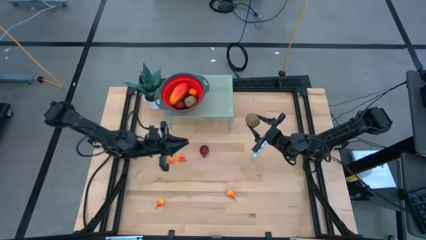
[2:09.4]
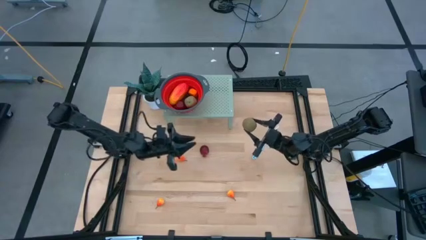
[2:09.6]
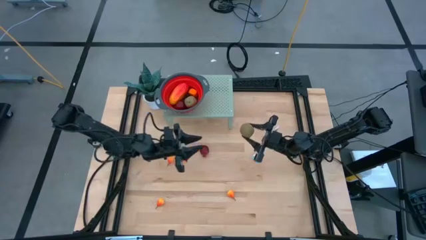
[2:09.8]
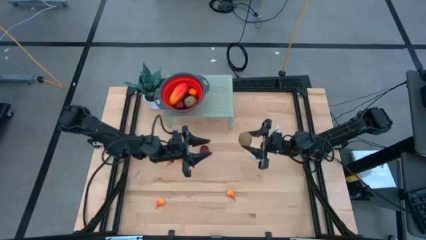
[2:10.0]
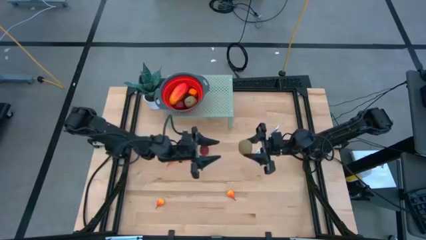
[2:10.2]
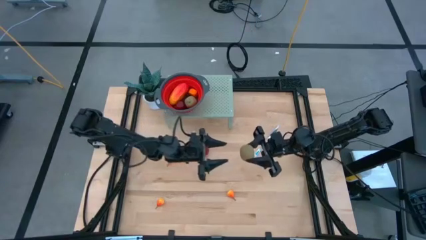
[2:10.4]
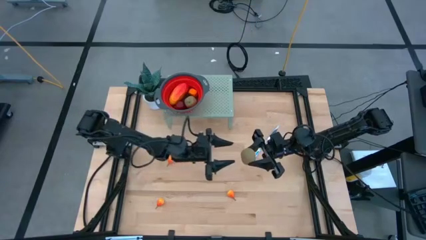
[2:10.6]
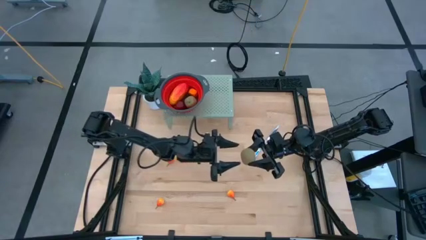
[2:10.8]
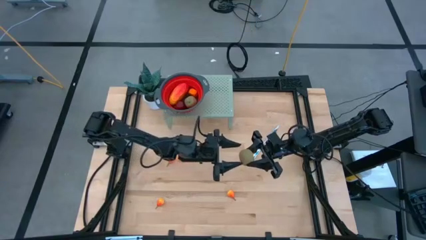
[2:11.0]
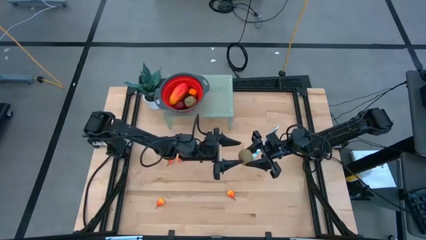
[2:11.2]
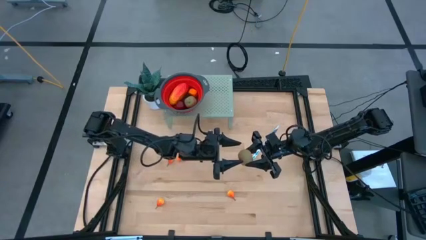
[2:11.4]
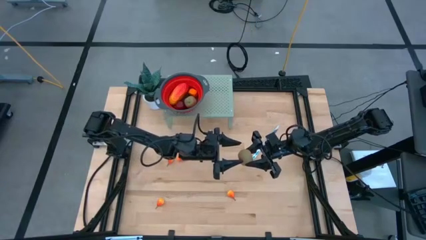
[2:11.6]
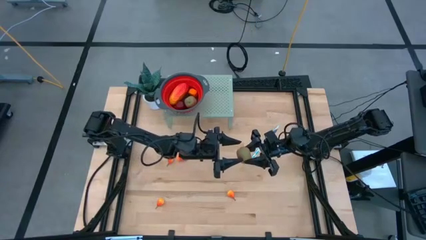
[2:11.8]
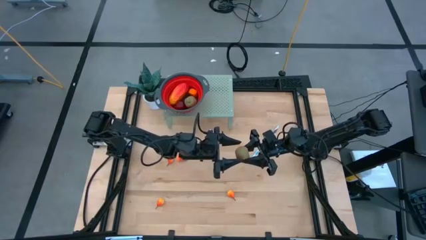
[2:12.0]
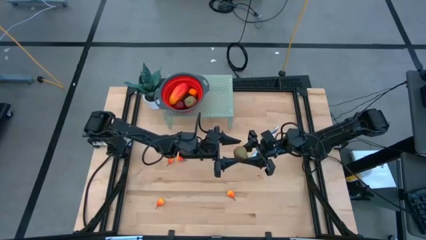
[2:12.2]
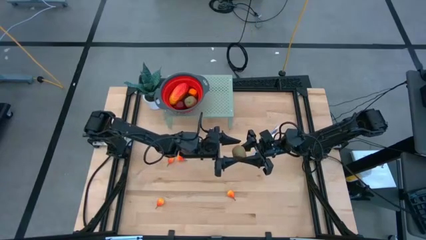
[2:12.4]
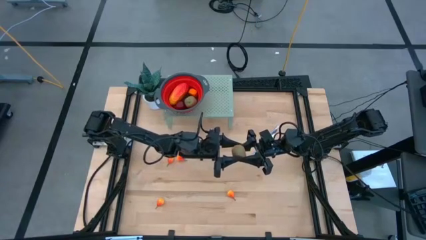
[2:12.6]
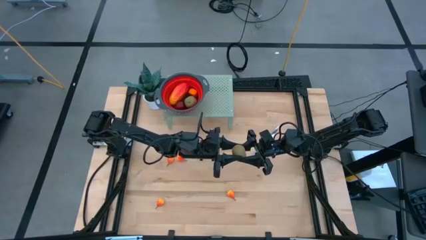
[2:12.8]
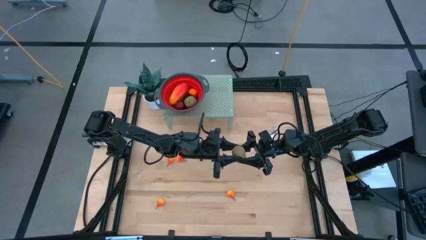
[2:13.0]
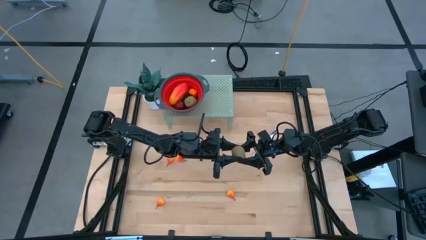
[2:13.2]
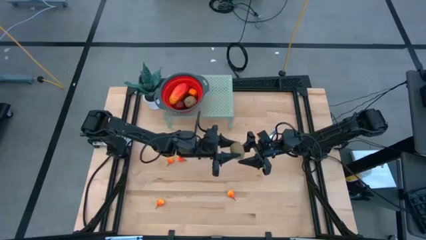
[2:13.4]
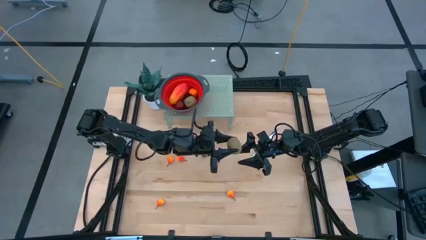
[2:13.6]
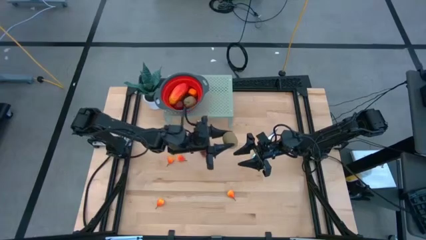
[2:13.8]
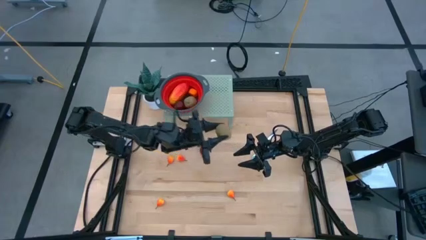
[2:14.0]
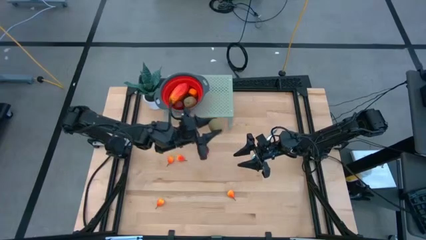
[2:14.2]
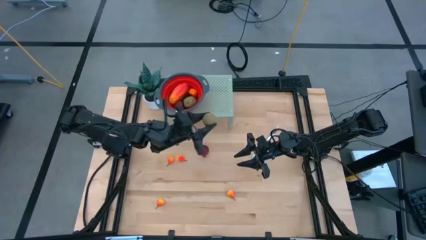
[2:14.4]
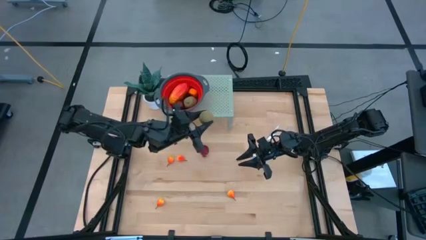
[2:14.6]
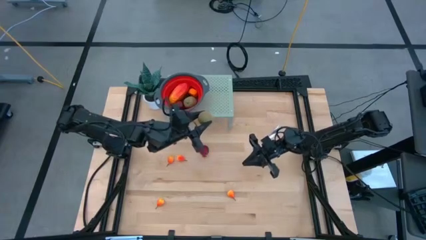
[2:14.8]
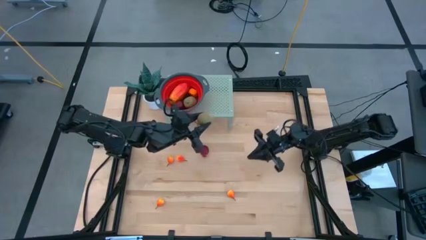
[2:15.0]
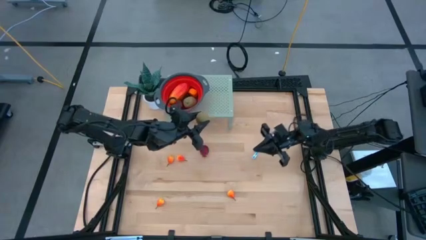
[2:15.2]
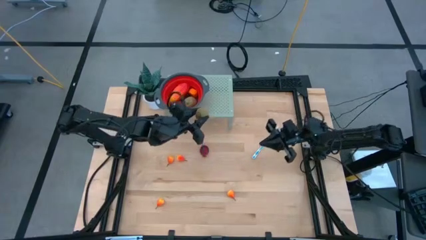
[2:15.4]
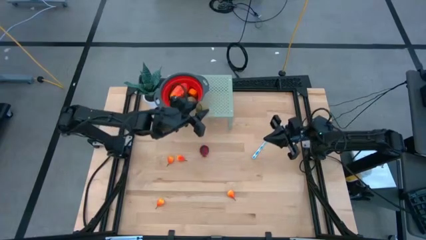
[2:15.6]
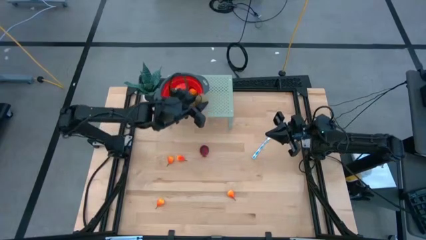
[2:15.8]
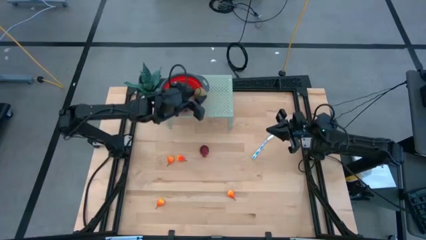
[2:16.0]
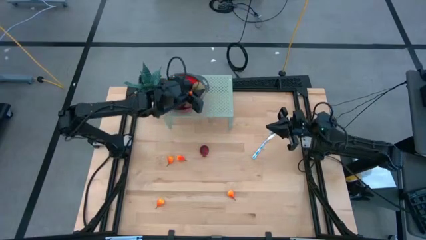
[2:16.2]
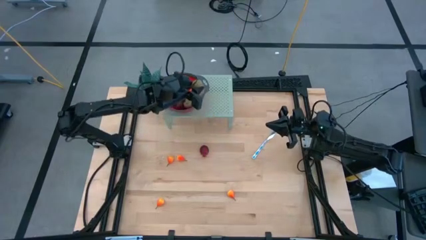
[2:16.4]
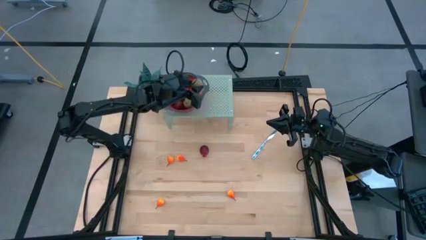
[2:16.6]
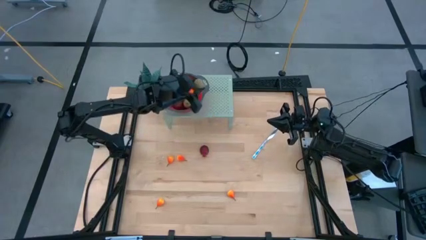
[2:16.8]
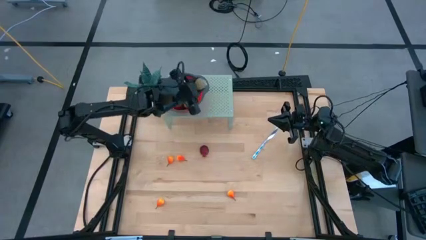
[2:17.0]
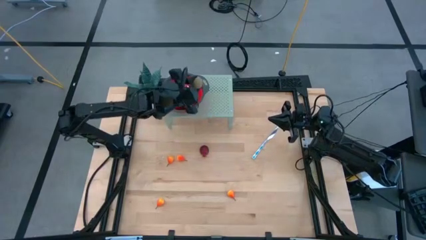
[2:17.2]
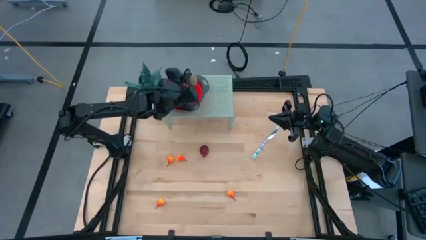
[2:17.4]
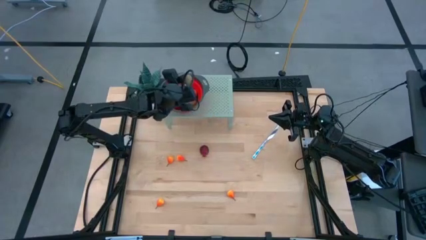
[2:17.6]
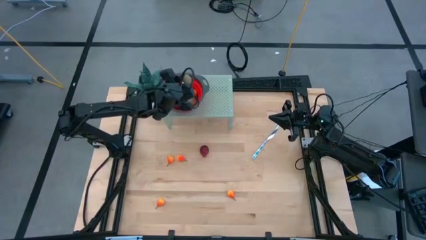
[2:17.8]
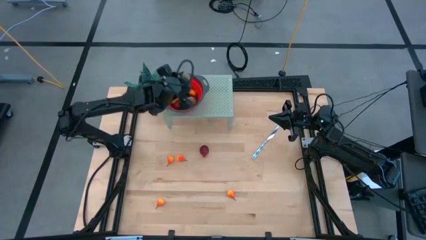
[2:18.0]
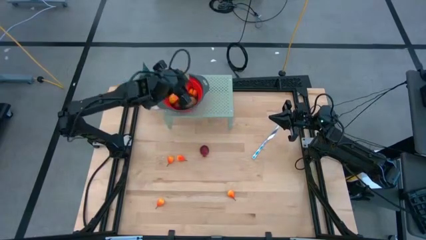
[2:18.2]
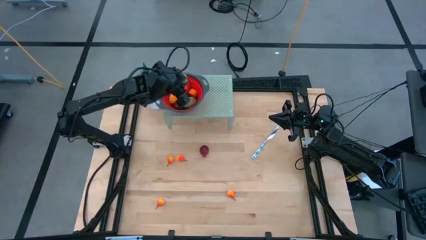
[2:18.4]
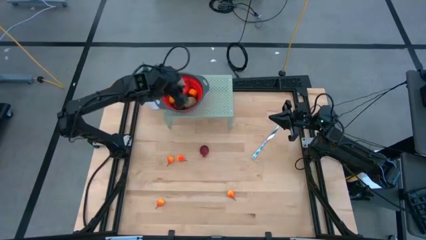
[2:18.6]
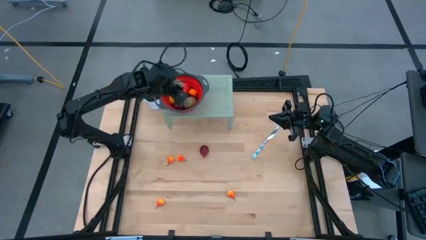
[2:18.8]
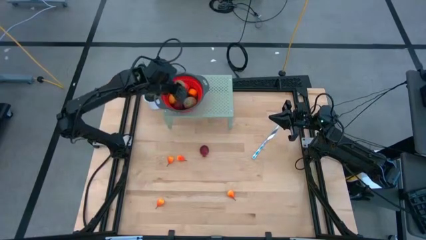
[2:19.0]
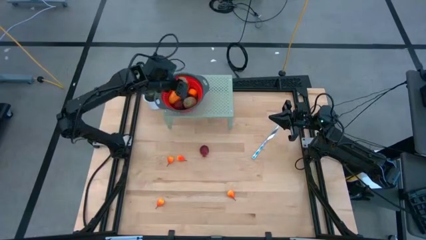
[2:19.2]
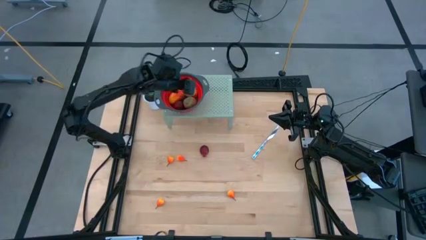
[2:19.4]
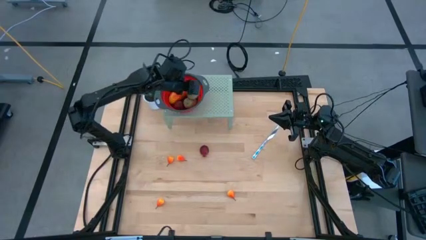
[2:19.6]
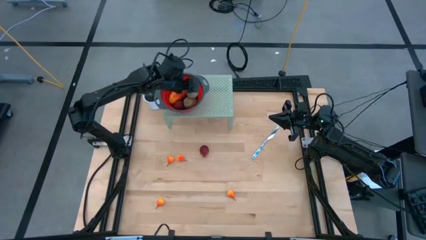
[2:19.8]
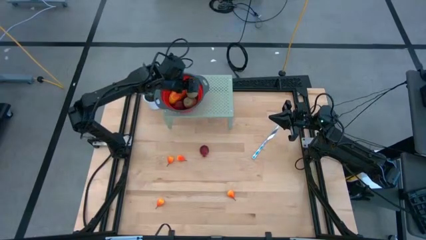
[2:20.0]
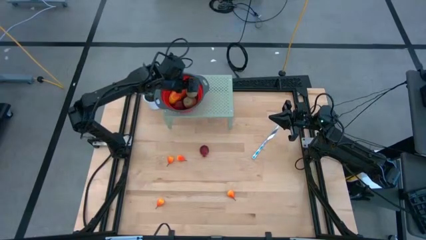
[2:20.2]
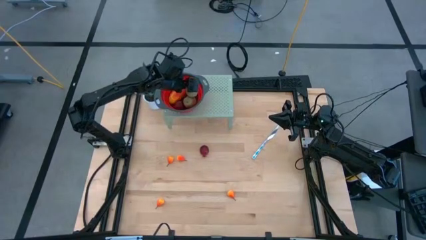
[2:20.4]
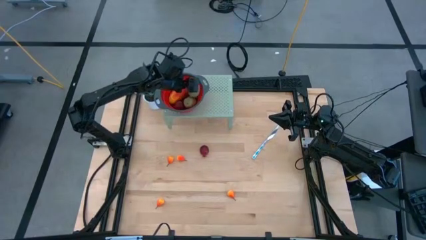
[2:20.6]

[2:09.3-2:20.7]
Task: Pick & Place Fruit
Put the kiwi into the red strainer bowl on the shelf
